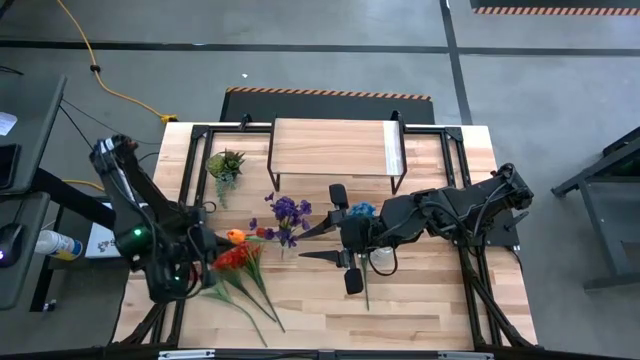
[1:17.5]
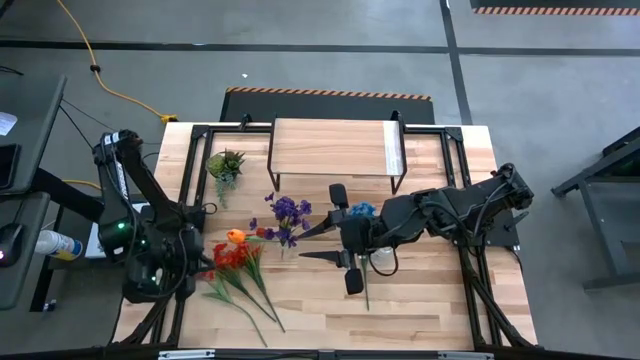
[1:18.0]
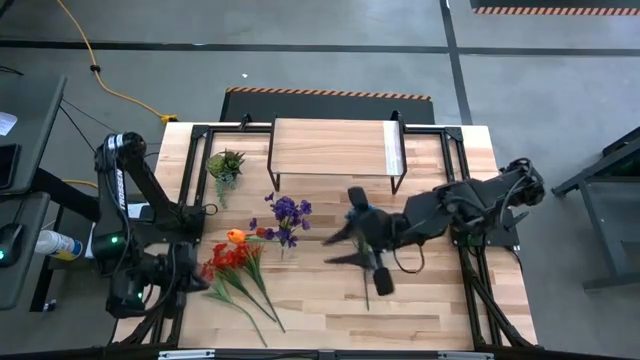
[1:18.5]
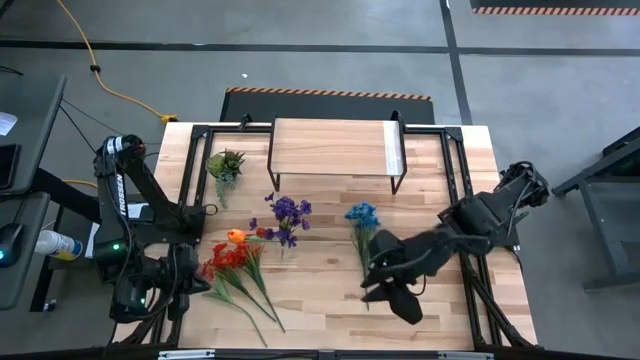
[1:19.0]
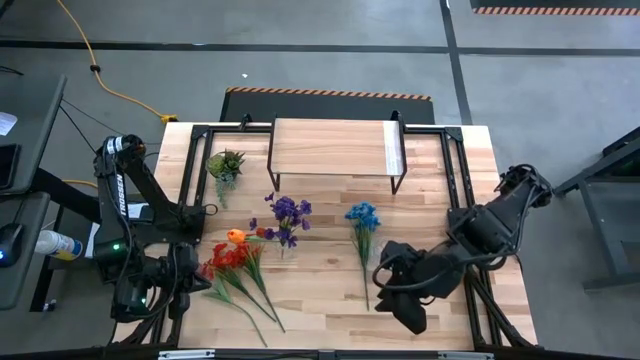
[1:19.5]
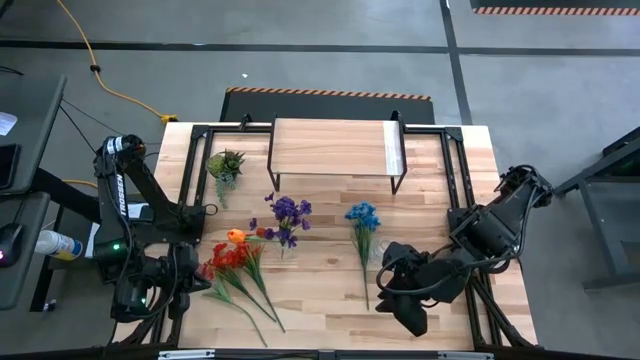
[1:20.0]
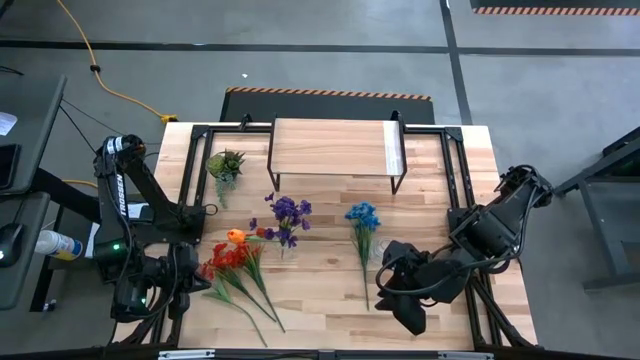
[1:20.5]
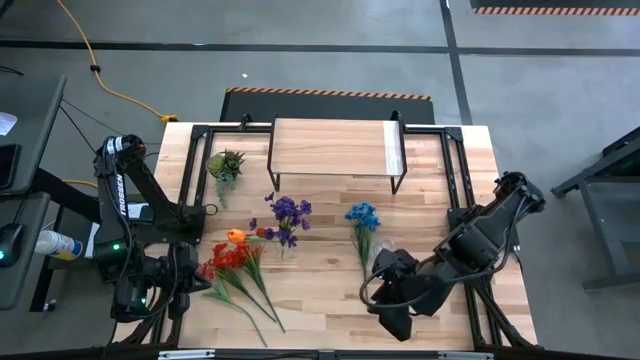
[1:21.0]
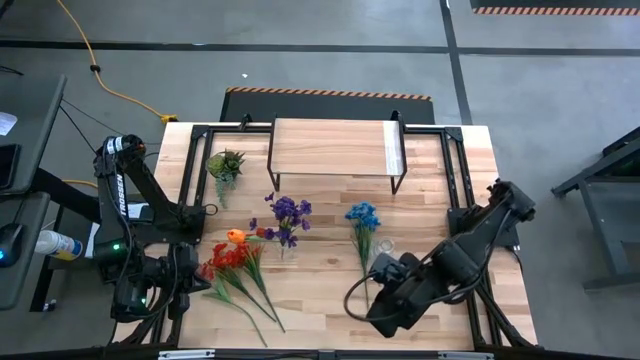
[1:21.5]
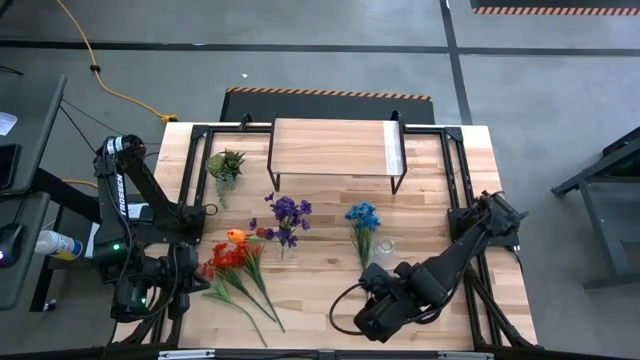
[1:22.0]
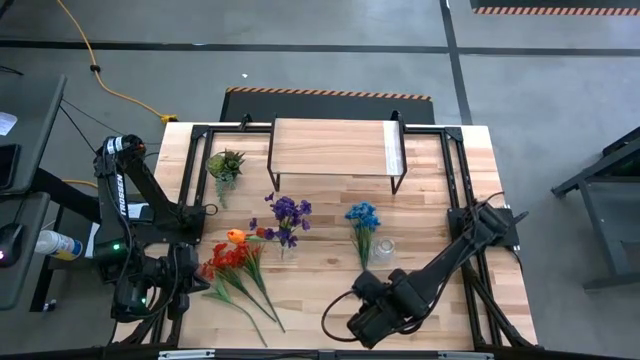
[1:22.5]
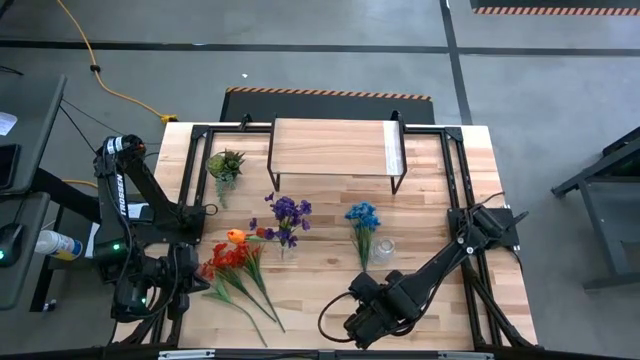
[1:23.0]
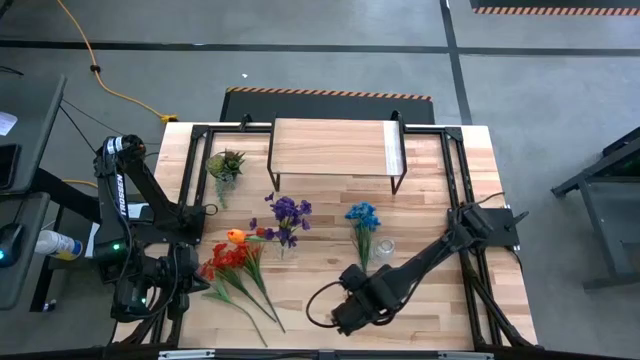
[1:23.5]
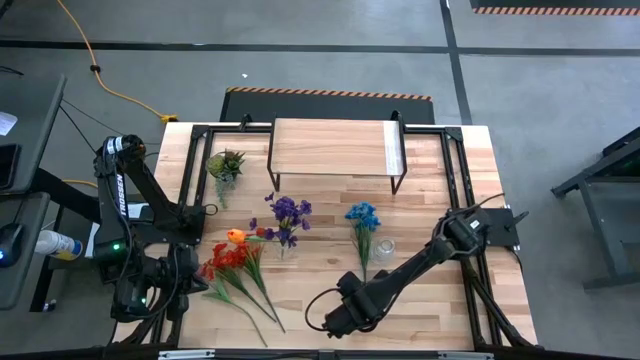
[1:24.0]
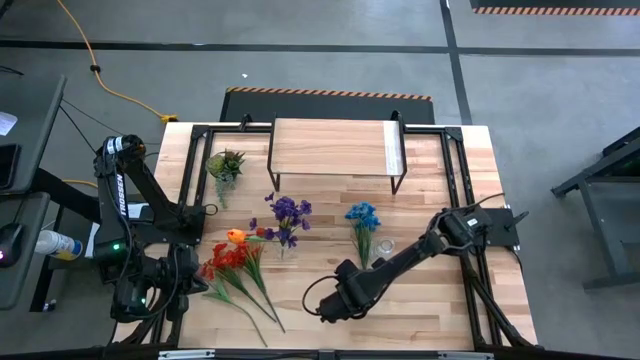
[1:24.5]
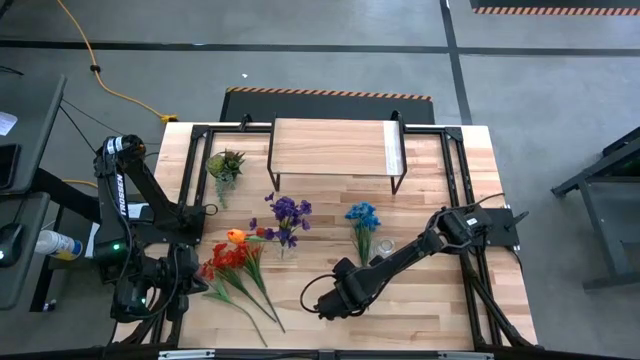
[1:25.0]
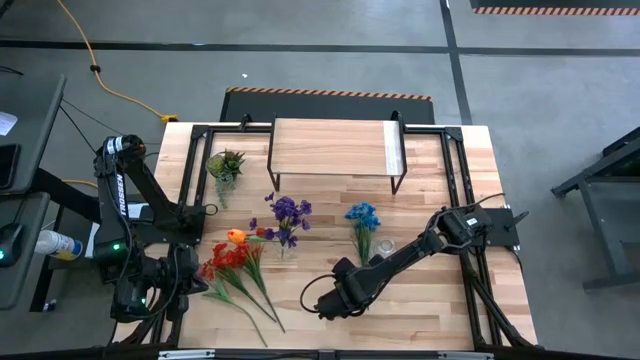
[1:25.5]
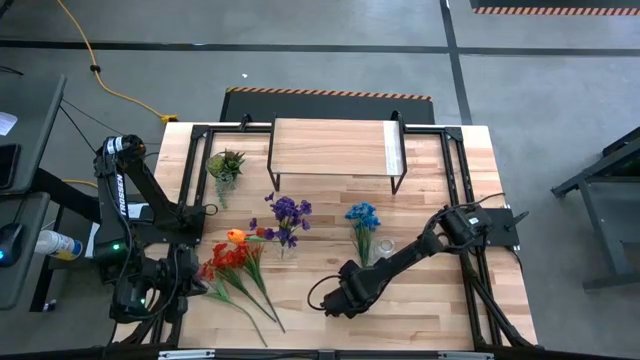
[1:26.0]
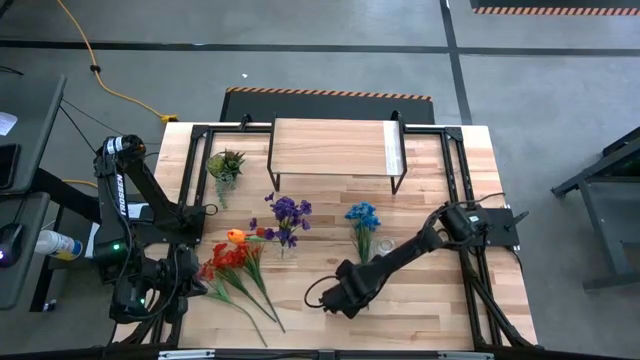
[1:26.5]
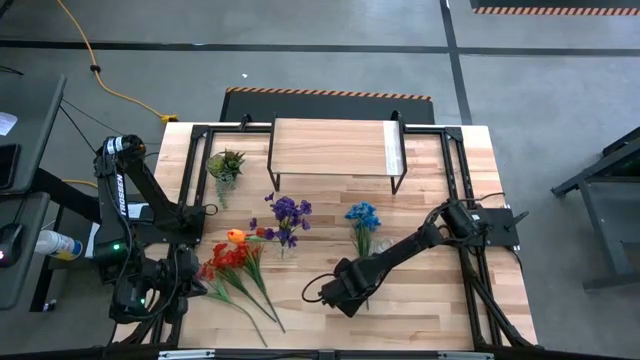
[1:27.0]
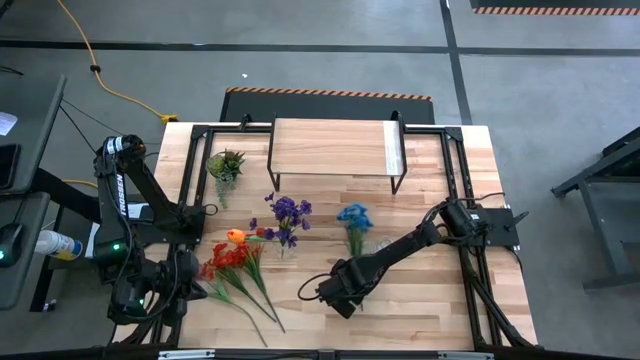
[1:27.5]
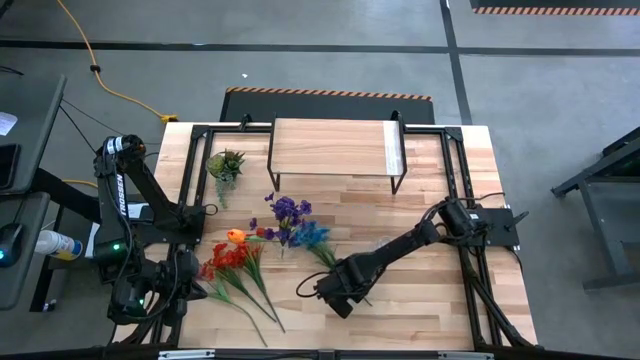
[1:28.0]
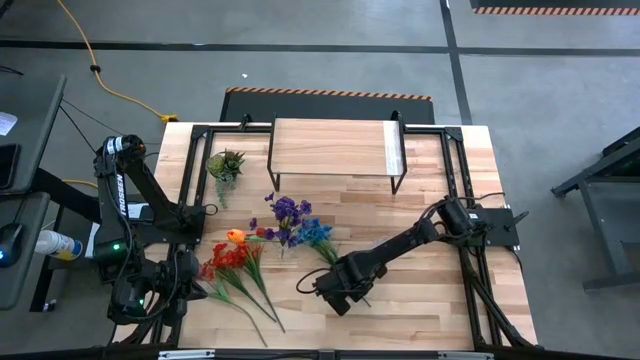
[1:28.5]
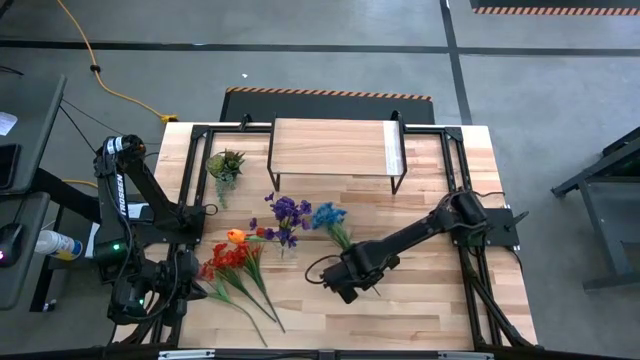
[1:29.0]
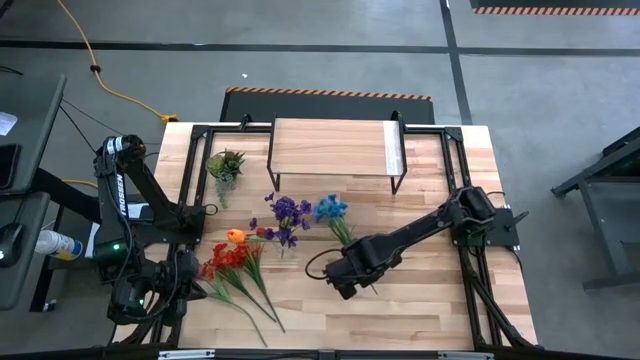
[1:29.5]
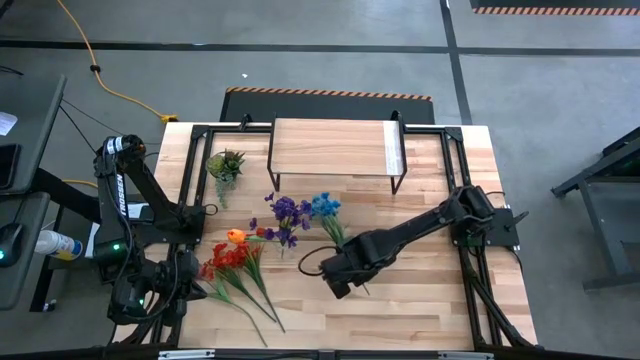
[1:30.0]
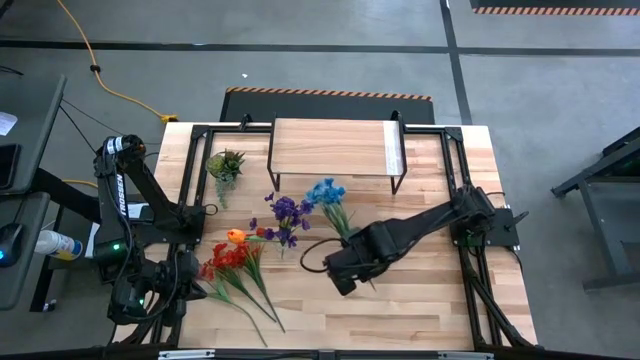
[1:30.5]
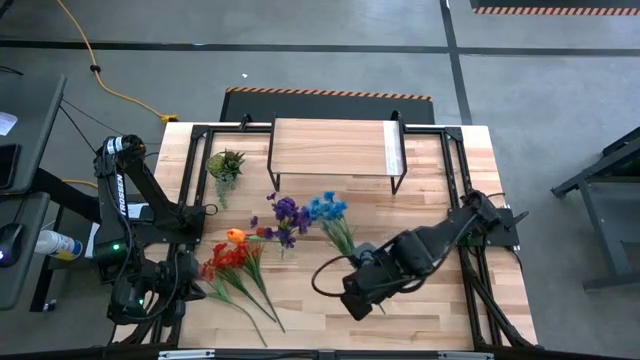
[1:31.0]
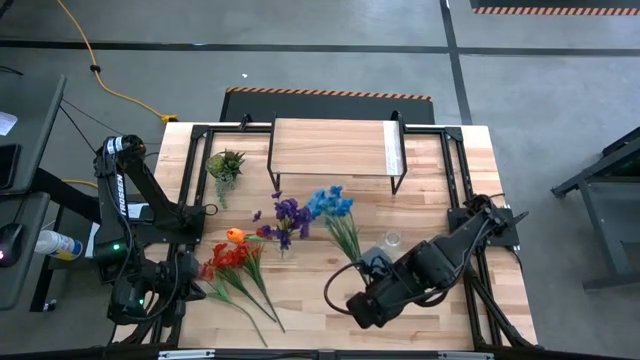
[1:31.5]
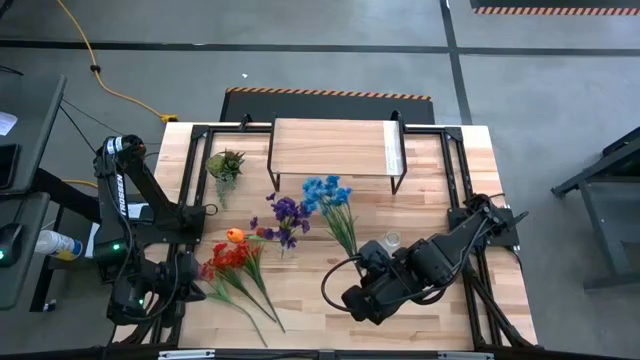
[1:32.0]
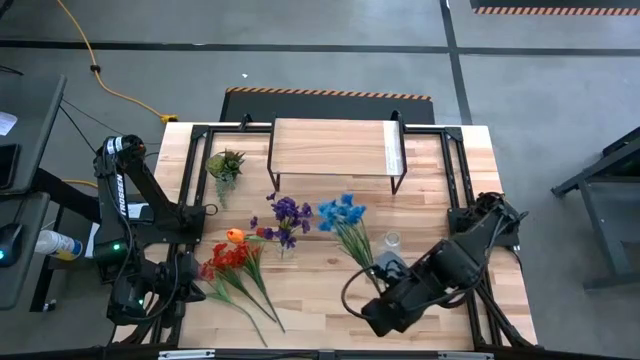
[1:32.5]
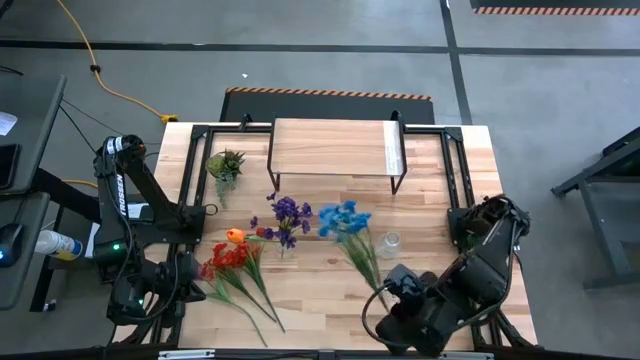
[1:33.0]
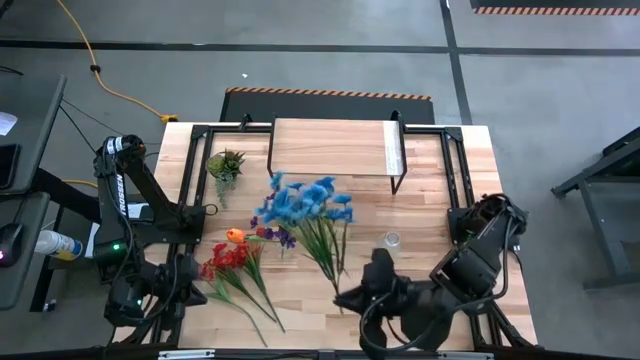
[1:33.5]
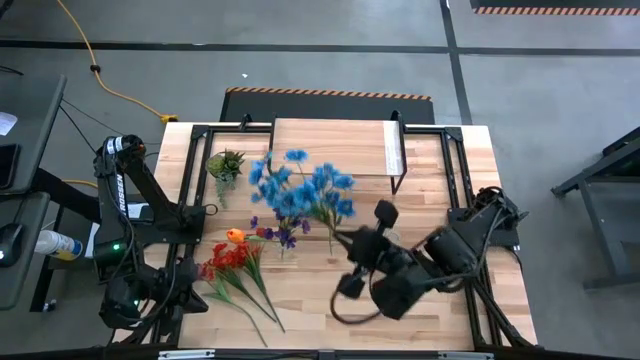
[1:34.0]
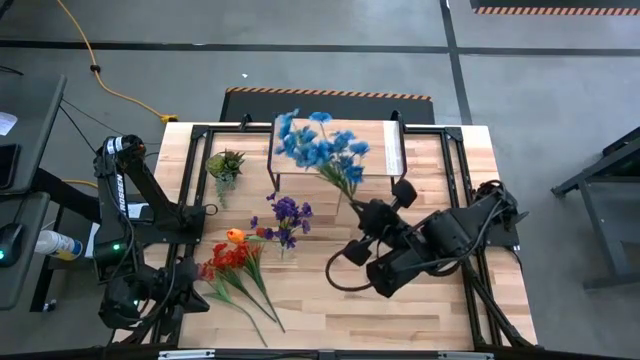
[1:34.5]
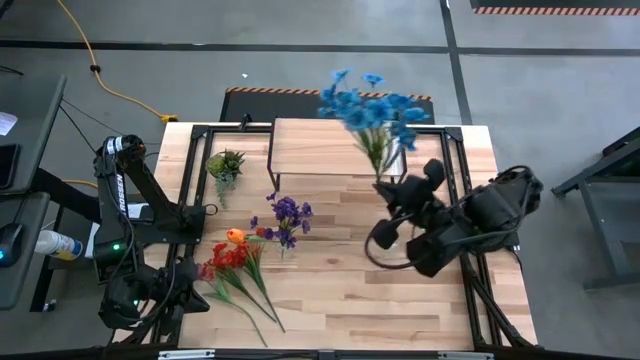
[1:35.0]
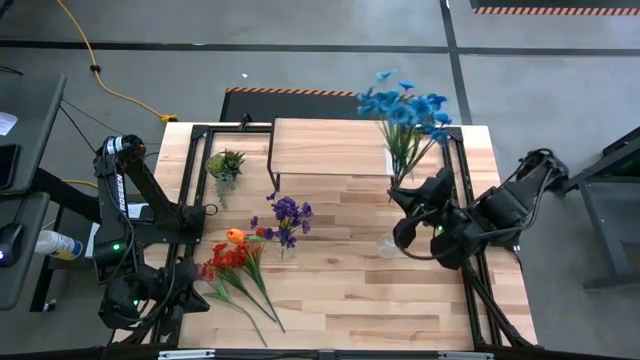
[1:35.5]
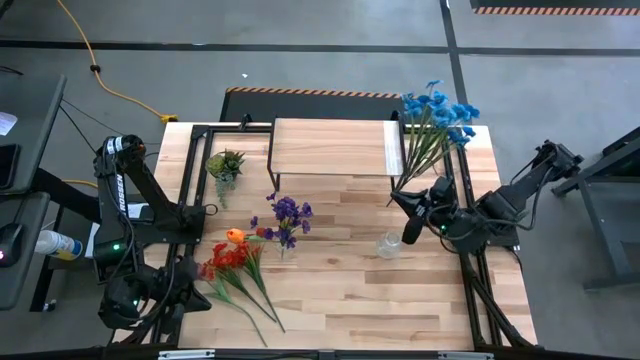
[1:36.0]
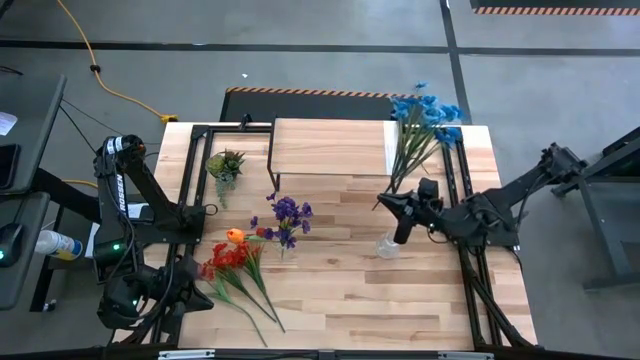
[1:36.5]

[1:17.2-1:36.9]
Task: Pick and place flowers into a vace then onto a shelf
Put the blue flower into the left transparent flower vase

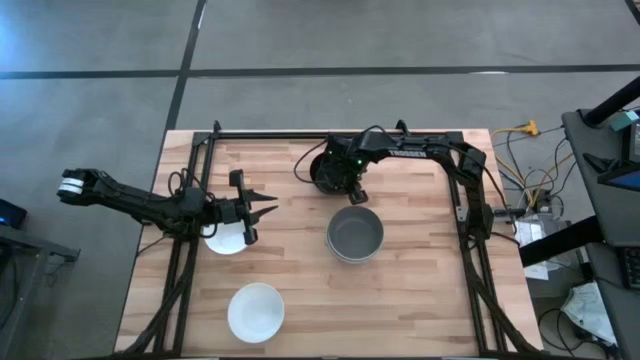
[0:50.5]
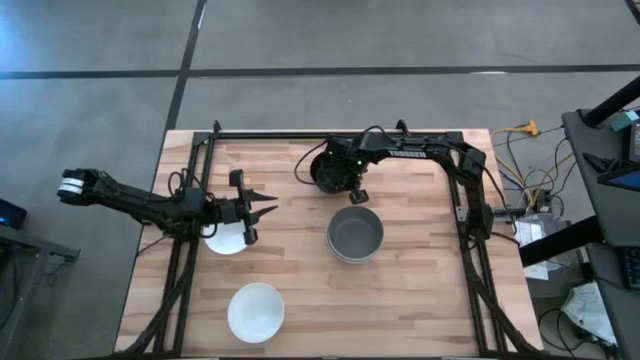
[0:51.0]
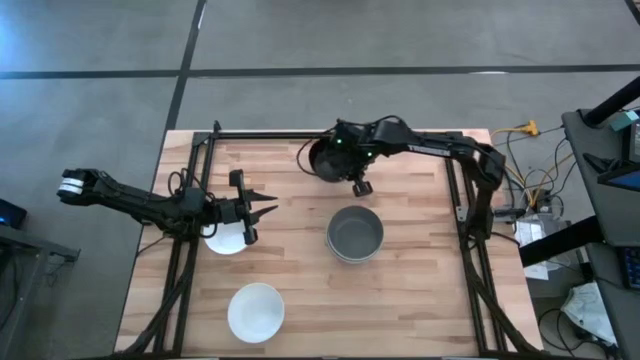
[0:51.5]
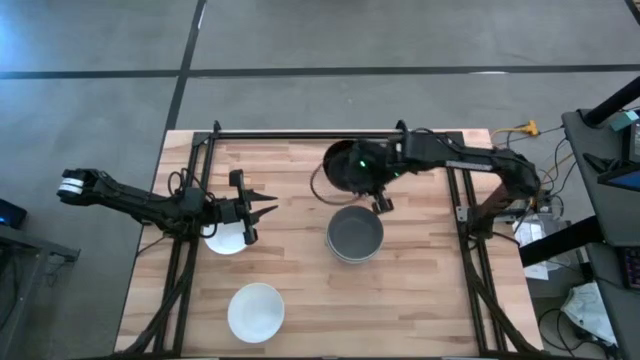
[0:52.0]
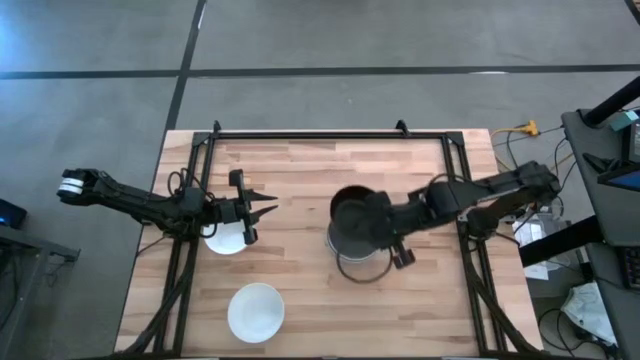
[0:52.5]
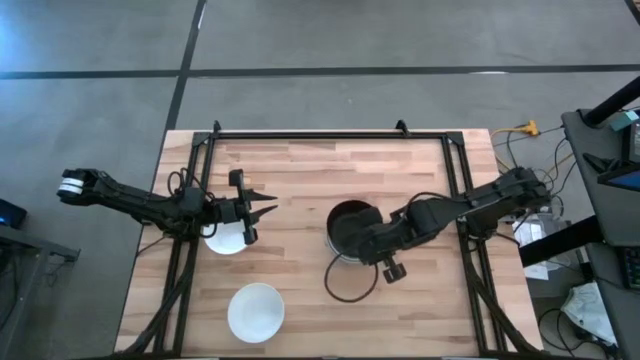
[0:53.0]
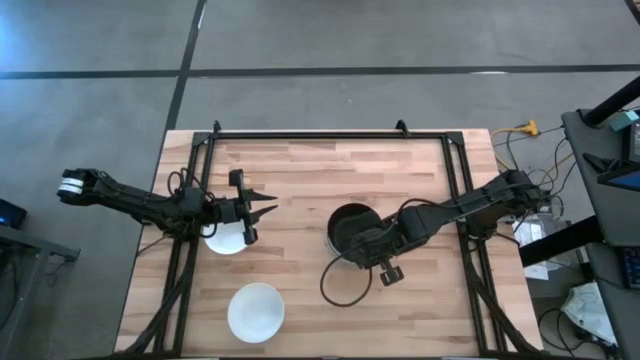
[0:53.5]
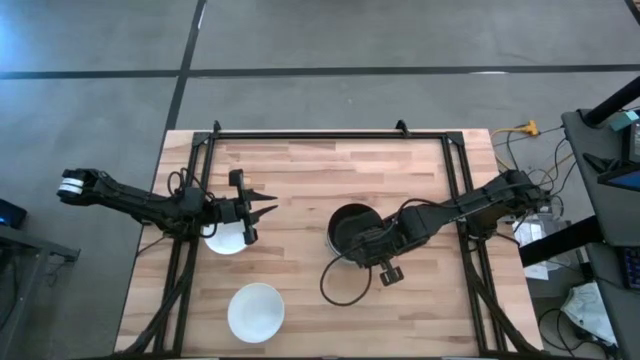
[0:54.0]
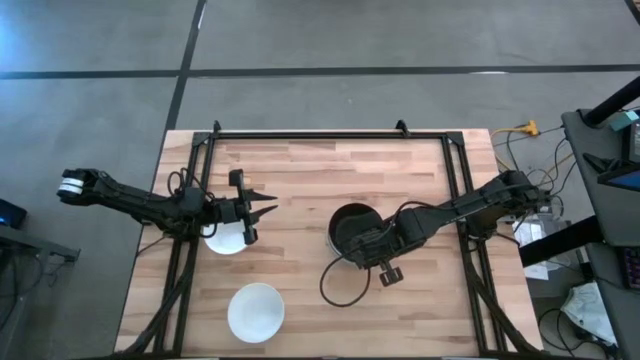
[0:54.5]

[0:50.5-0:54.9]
Task: Nest bowls inside each other
Stack the black bowl on top of the green bowl
